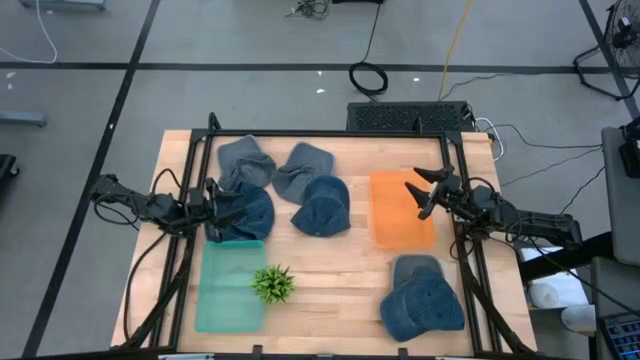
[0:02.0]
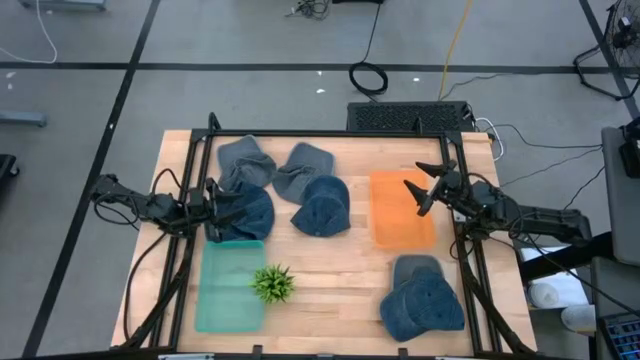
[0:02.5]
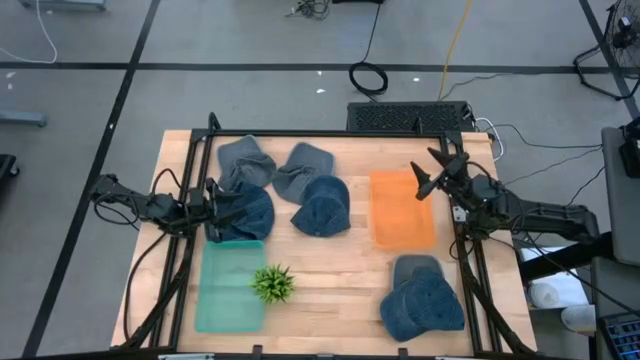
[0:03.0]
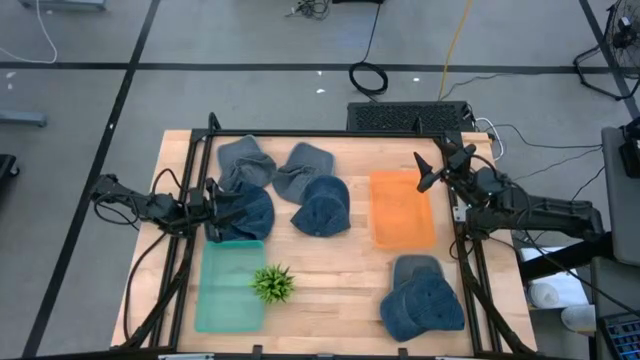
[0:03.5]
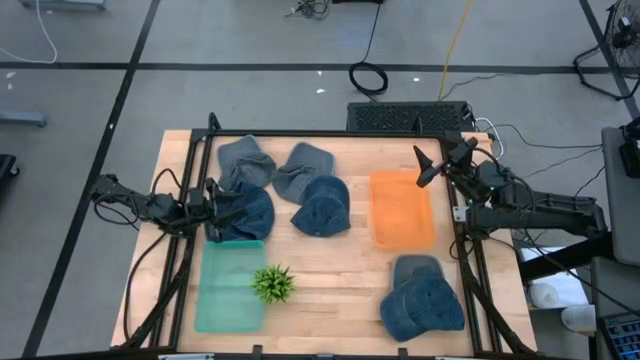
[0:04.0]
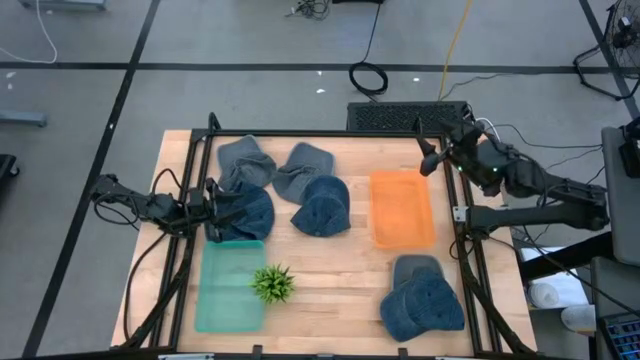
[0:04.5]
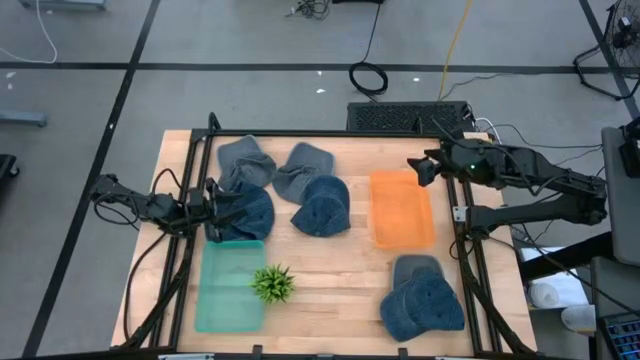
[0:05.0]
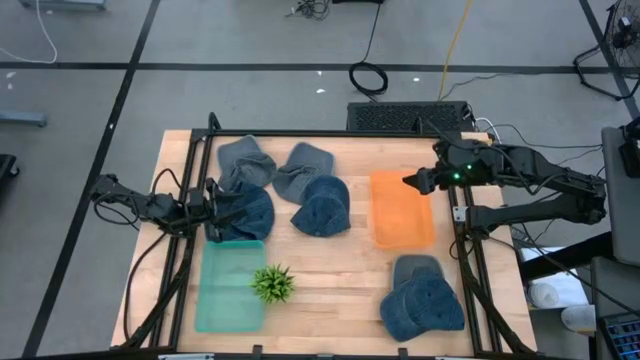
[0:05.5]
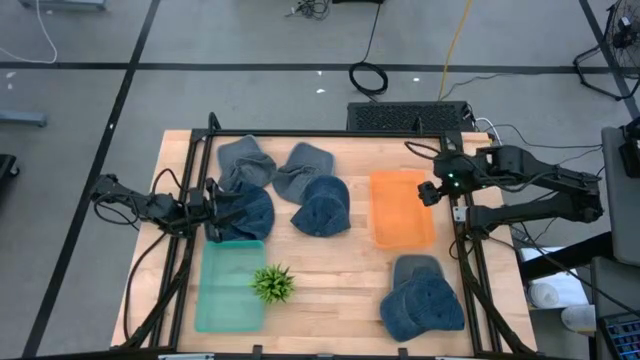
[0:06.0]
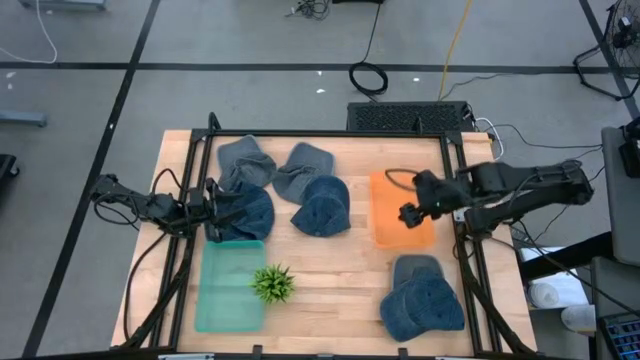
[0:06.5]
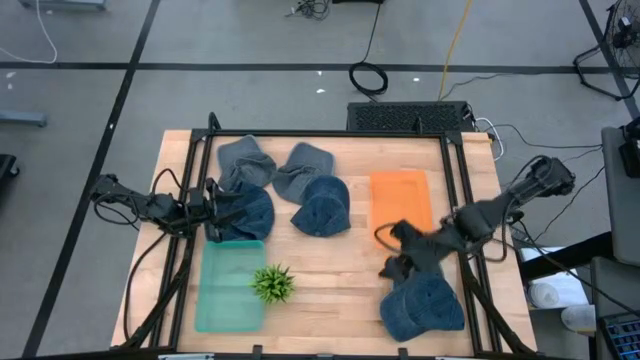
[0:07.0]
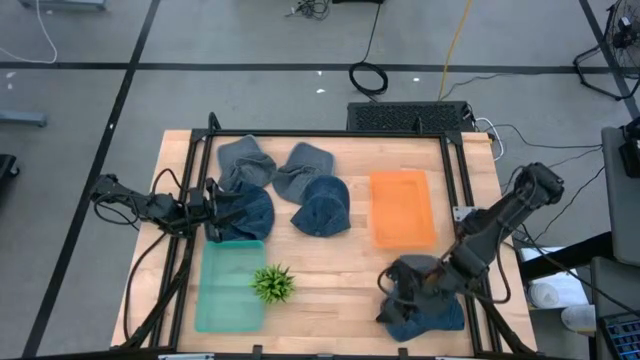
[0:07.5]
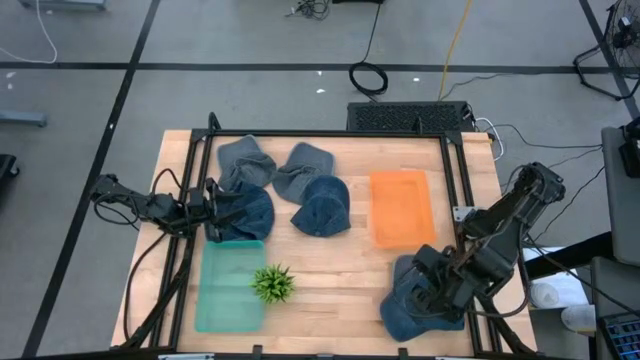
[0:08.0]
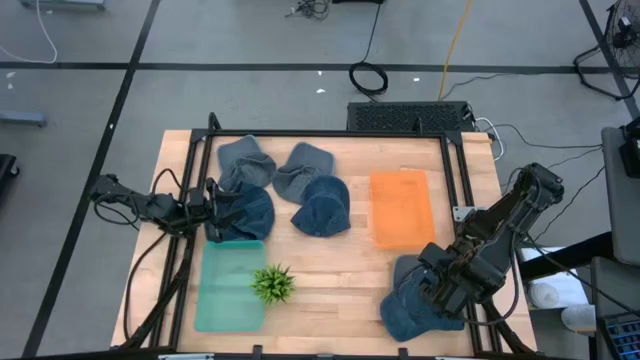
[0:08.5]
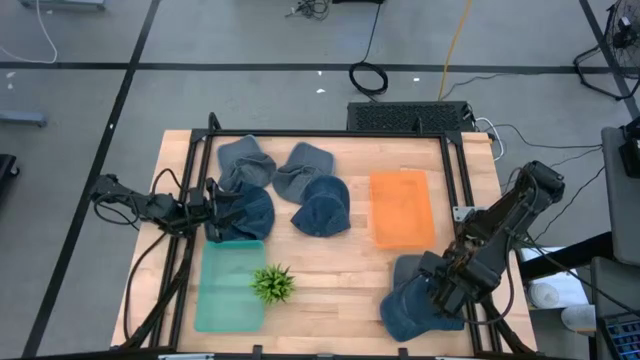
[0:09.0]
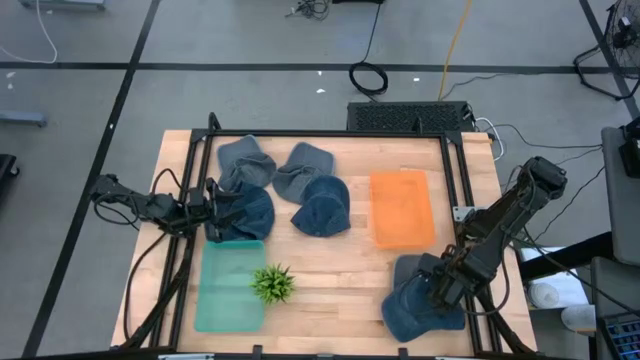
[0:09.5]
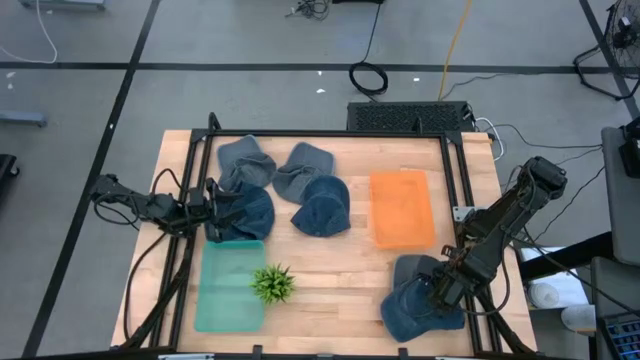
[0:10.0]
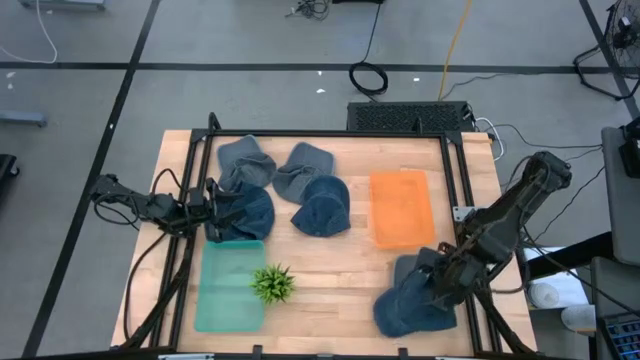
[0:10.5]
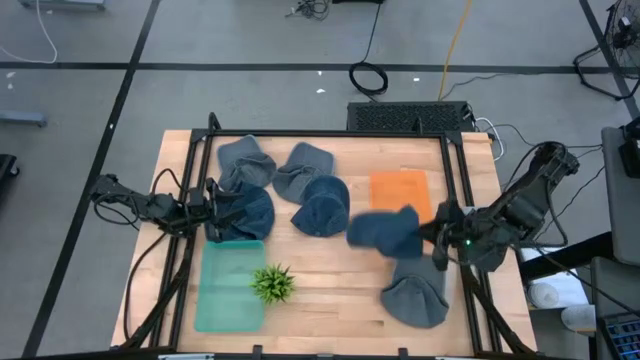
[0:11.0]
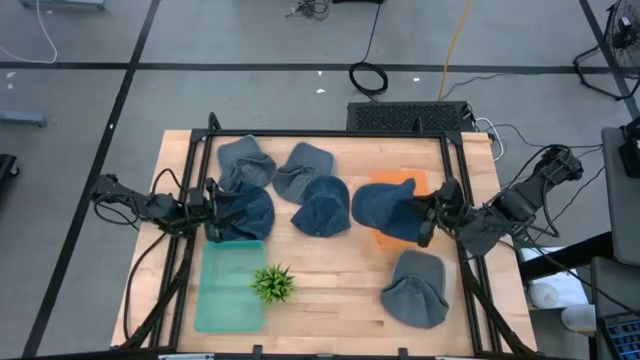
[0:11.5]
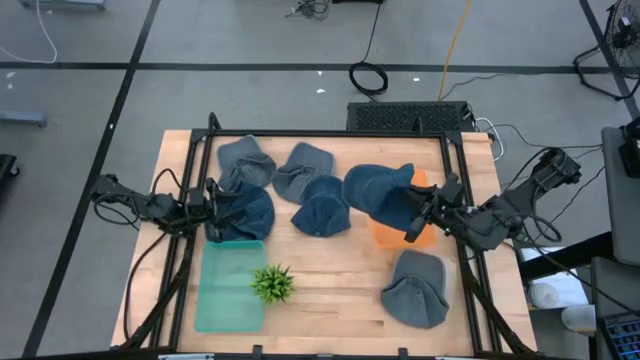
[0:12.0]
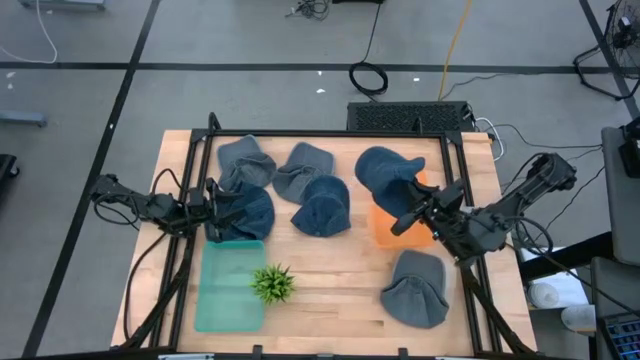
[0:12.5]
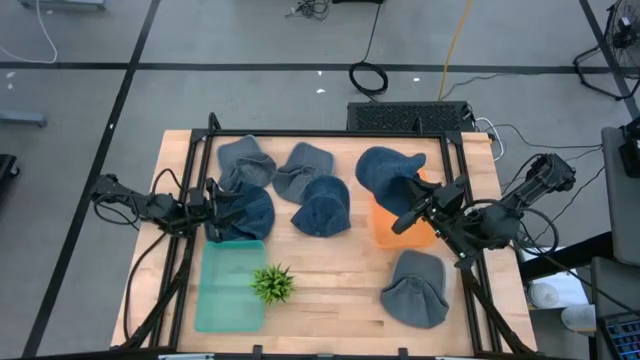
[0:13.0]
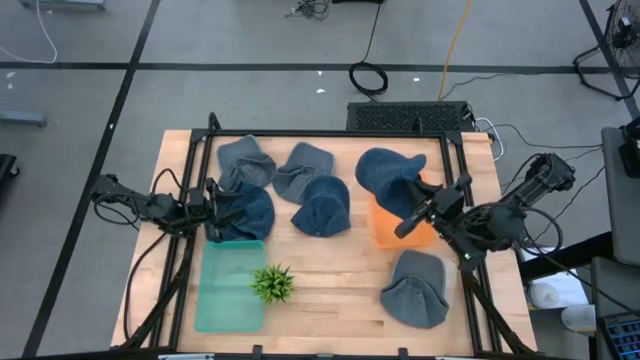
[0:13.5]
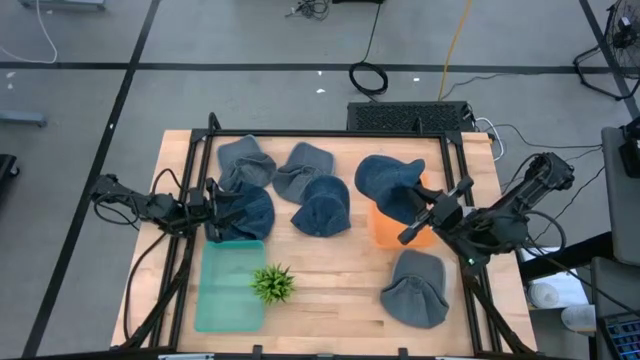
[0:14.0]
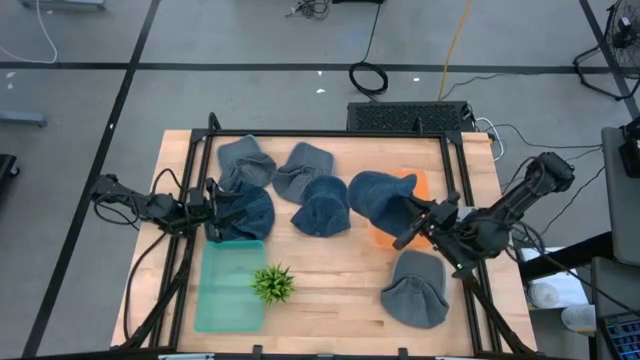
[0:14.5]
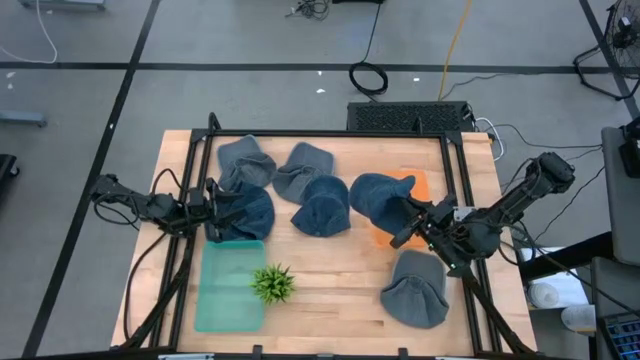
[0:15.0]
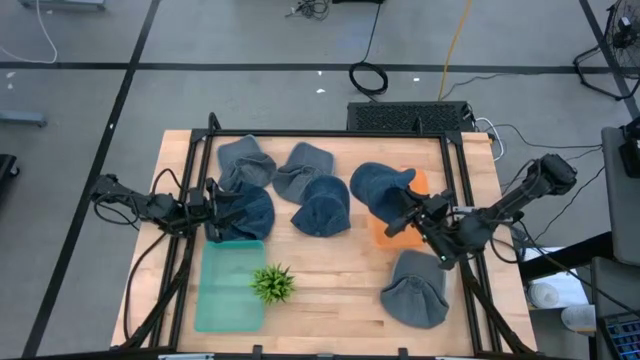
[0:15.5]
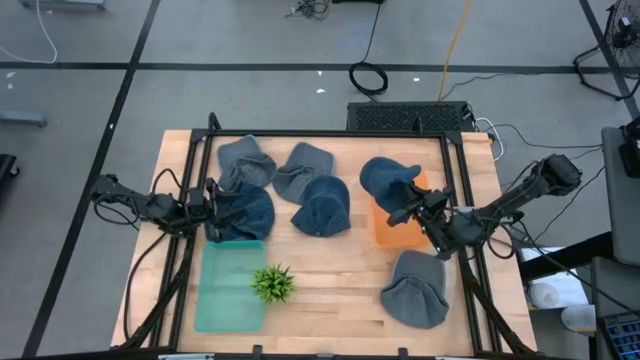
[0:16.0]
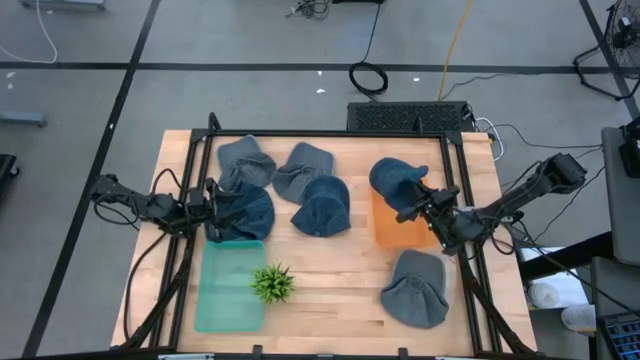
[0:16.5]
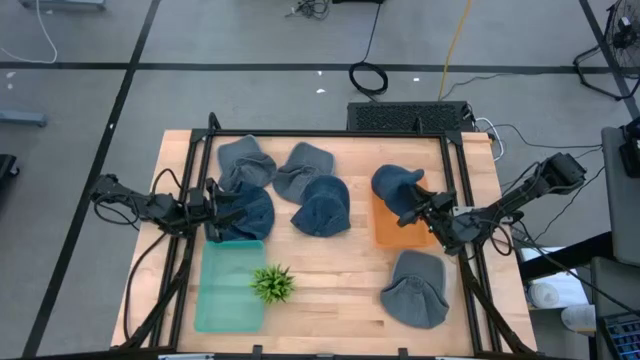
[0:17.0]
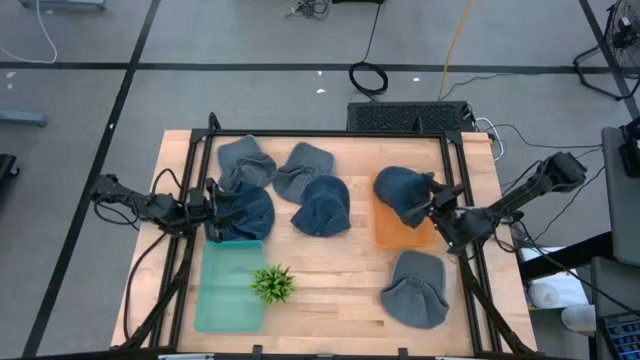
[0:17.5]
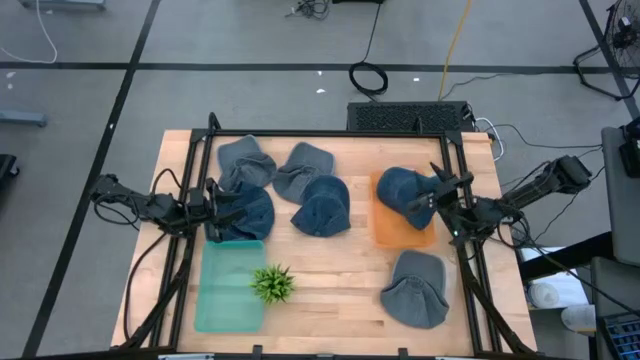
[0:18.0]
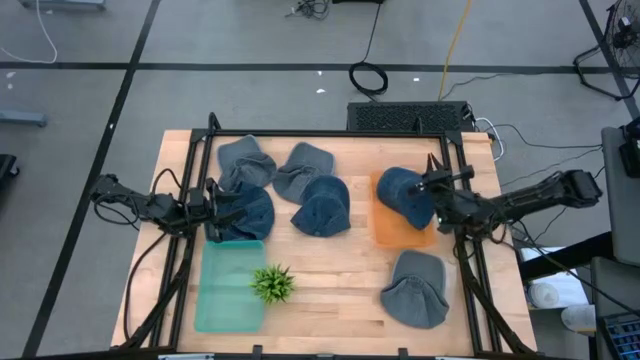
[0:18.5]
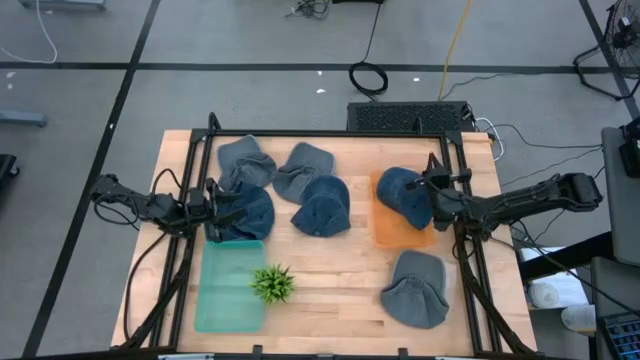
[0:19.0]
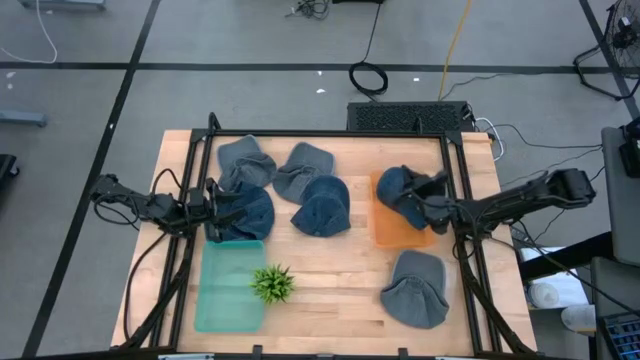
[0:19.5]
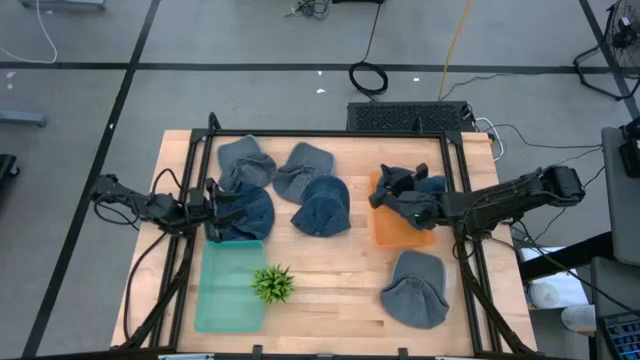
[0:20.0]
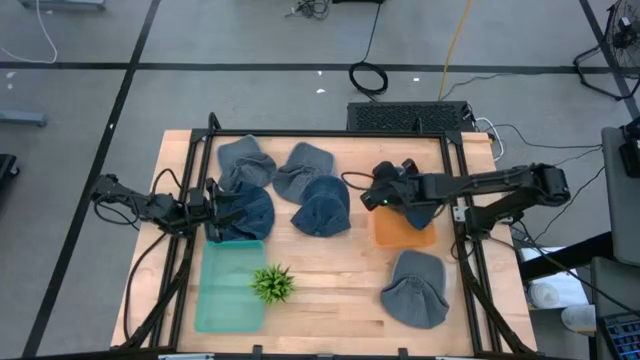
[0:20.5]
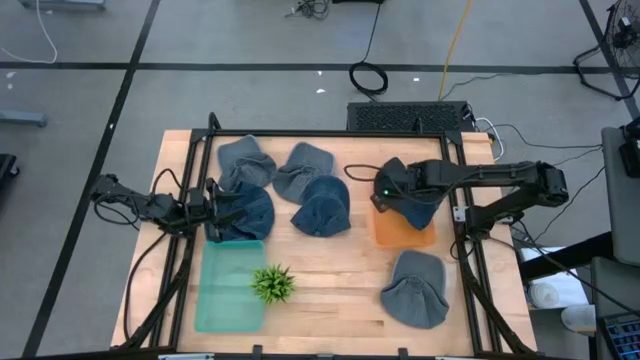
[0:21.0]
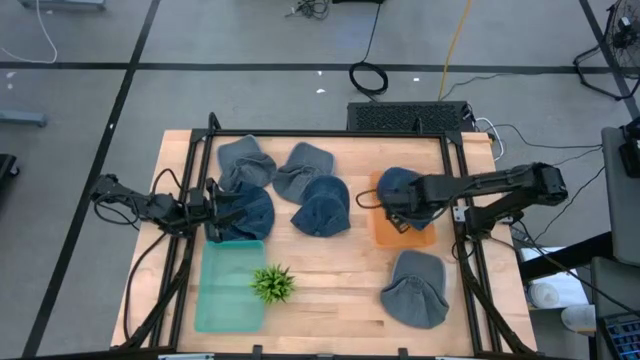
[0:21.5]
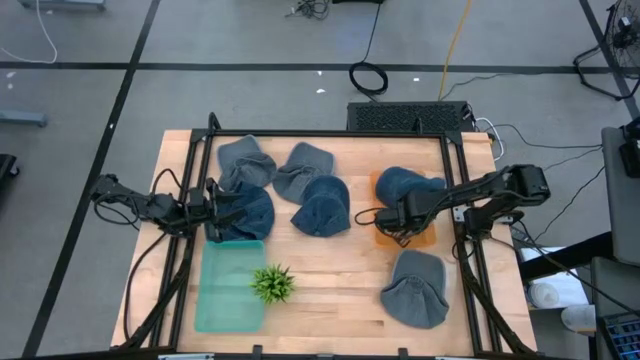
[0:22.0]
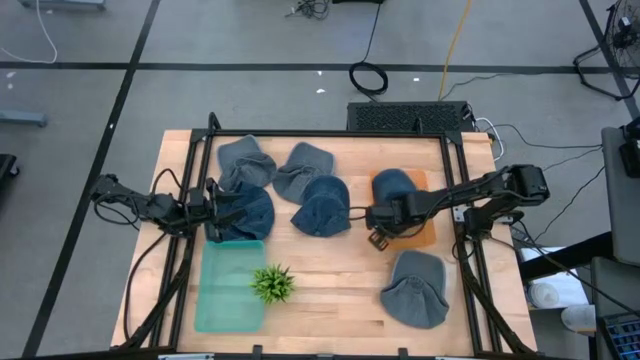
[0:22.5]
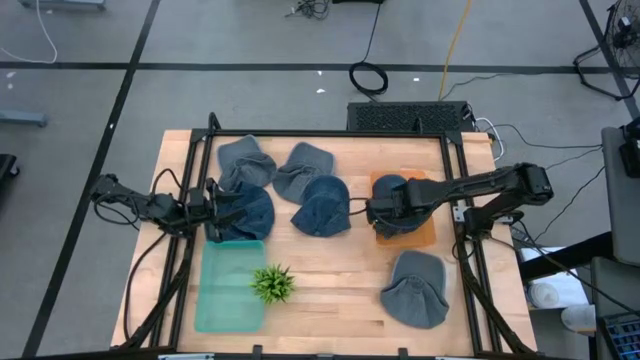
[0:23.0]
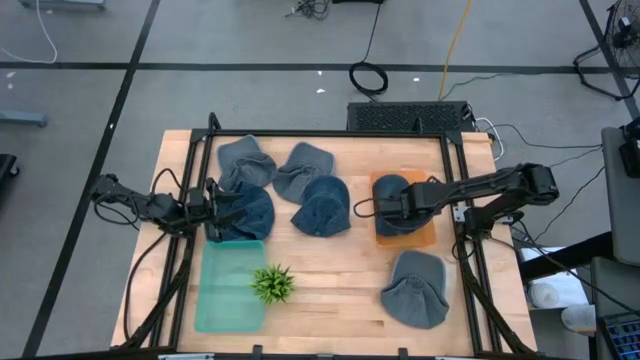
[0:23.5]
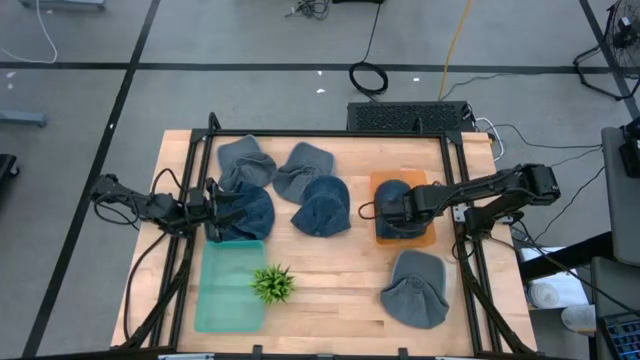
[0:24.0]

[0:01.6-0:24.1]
Task: Pick & Place hat
Put the bottom blue cap into the orange bin
